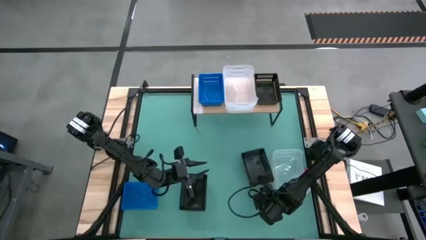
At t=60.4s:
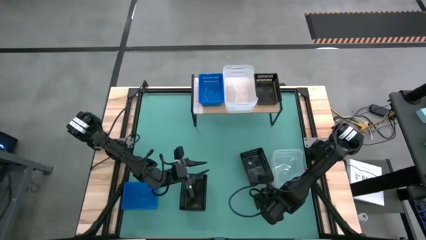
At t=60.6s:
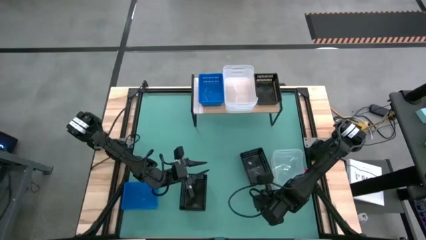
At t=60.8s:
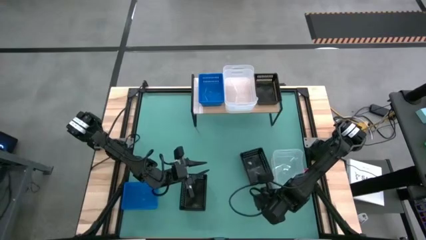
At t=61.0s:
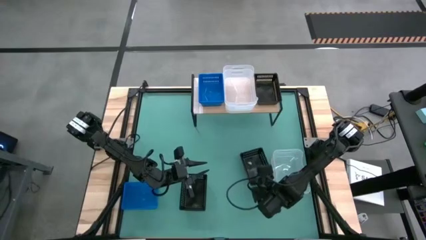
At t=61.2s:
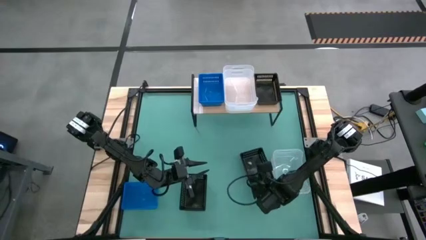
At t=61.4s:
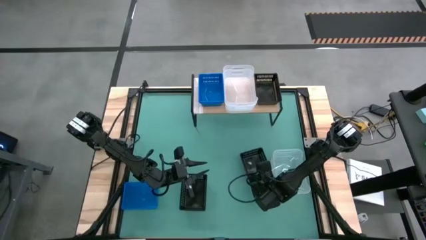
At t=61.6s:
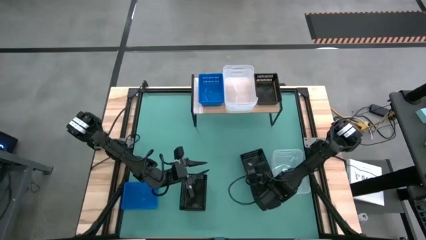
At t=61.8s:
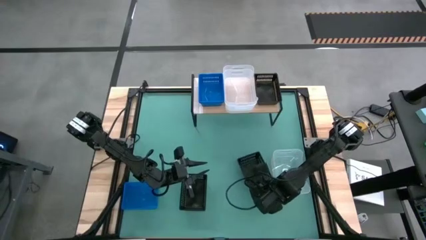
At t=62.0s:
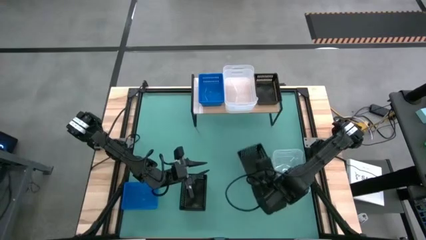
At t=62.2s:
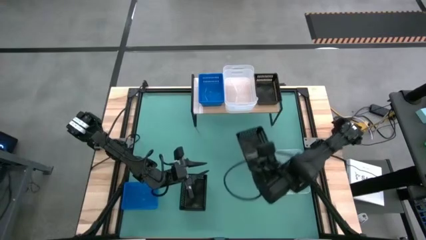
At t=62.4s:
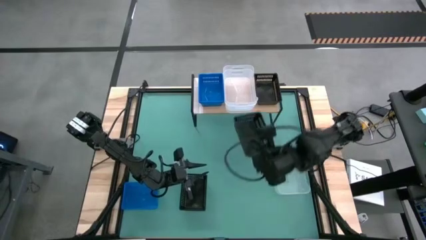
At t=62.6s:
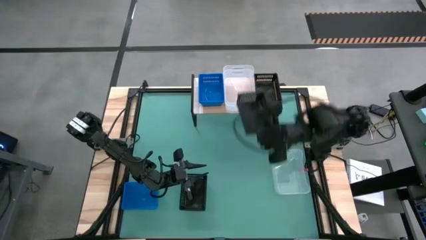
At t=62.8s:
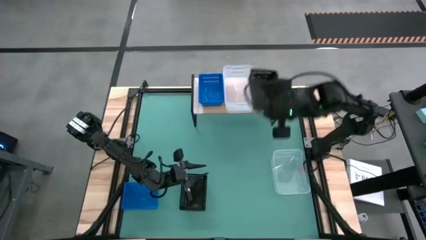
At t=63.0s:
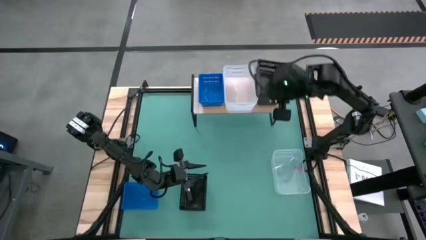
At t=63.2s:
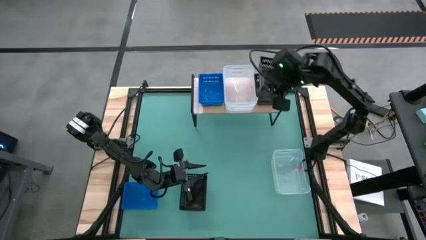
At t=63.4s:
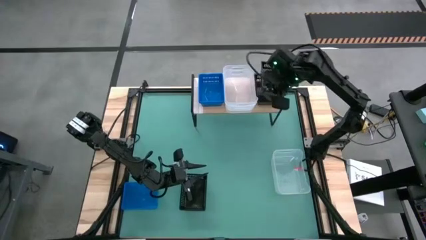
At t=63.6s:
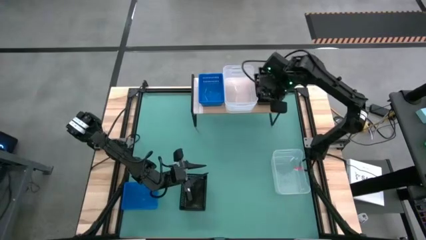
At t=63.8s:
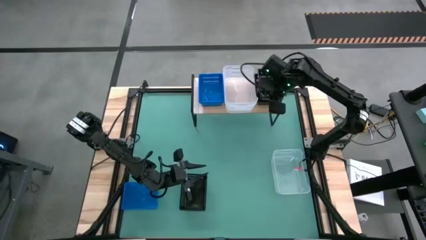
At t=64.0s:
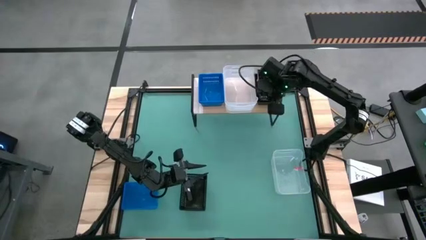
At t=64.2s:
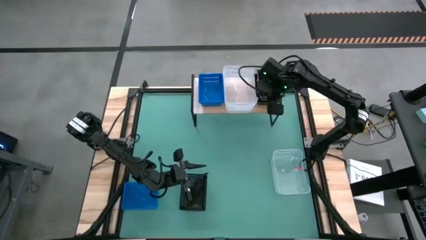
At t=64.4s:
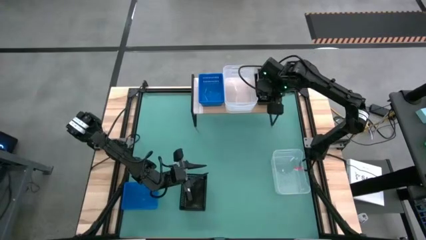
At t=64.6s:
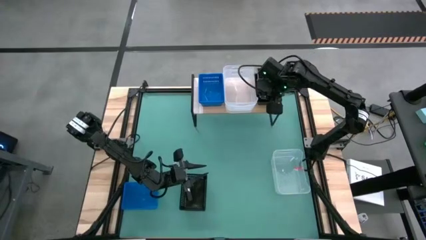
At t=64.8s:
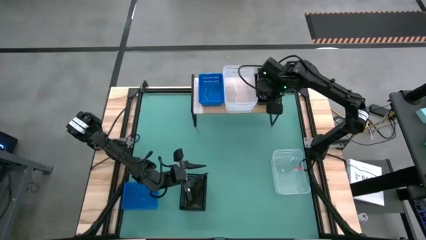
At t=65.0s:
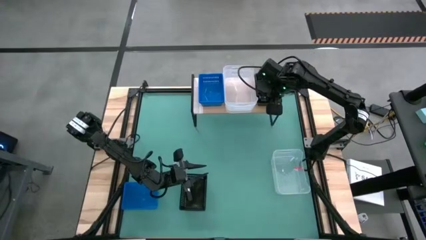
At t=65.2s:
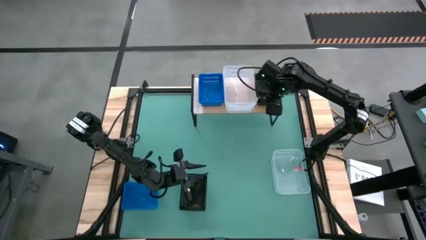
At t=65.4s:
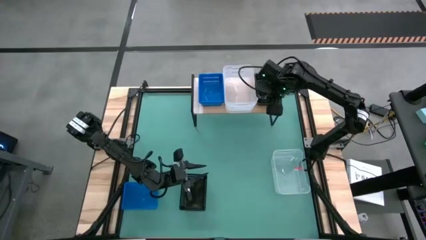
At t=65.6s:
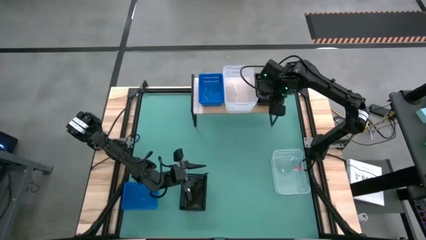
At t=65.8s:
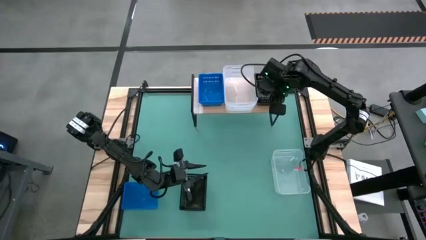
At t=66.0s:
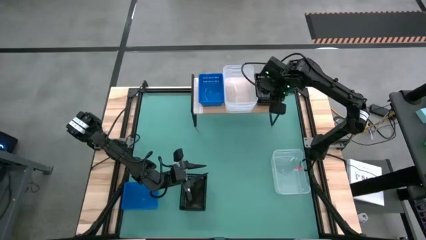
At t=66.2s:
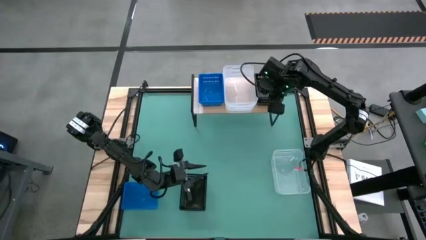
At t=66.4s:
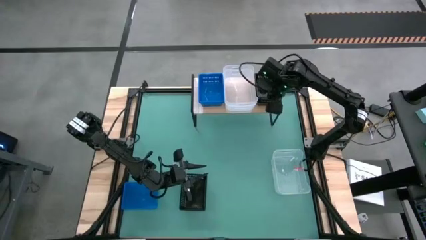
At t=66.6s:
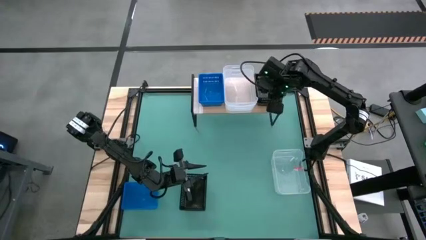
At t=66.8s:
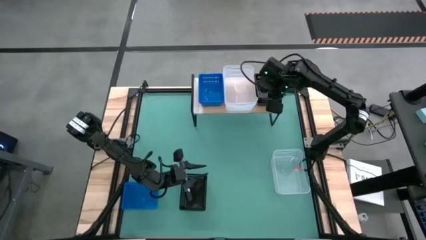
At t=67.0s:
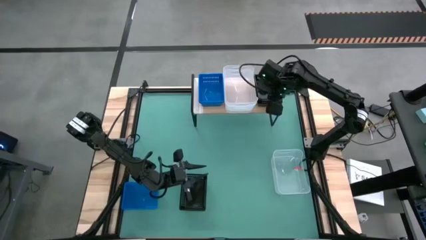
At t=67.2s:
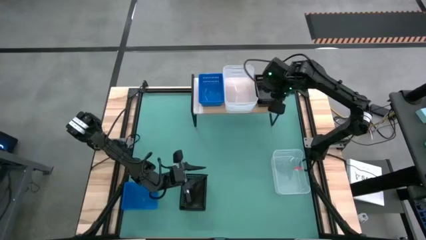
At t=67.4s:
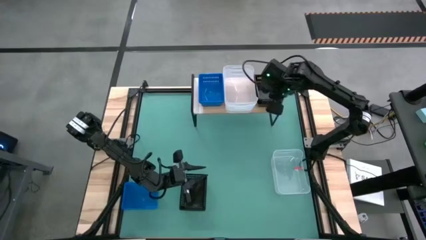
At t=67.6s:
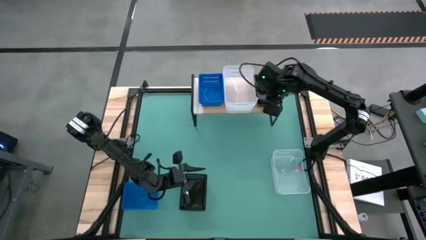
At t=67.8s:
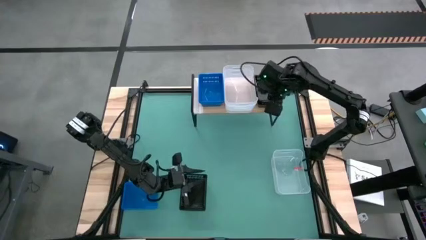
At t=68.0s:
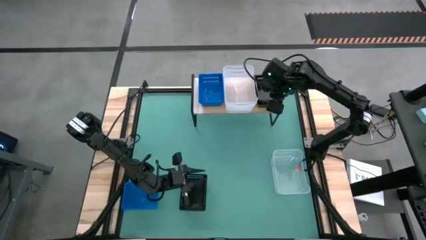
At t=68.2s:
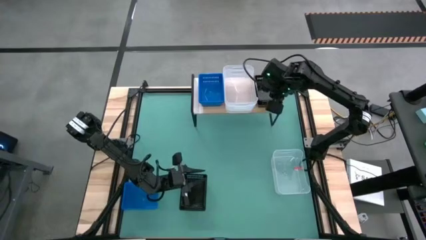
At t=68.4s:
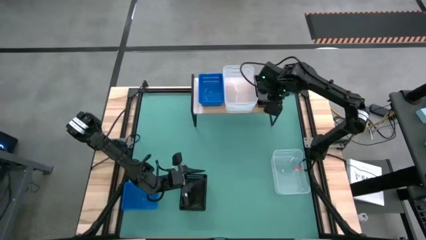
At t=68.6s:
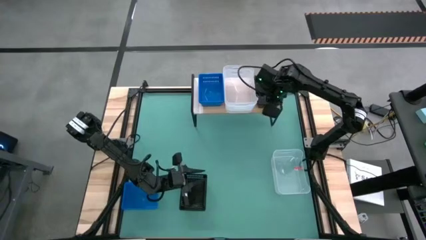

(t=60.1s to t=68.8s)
Task: Stack baskets on shelf by color
Stack the right black bin on the black bin on the shelf

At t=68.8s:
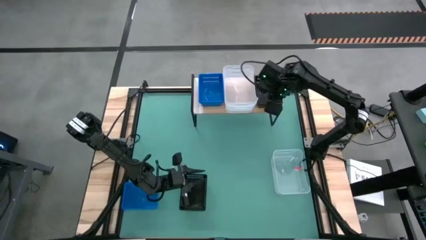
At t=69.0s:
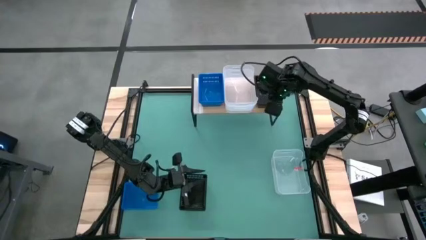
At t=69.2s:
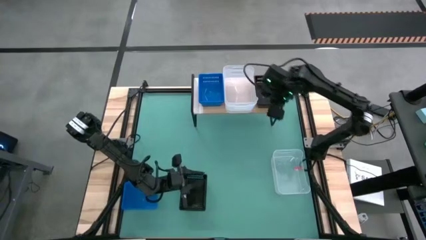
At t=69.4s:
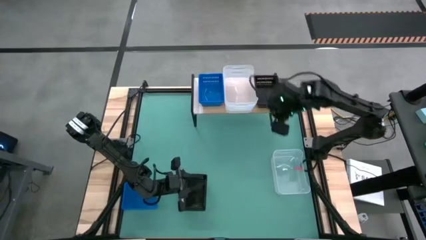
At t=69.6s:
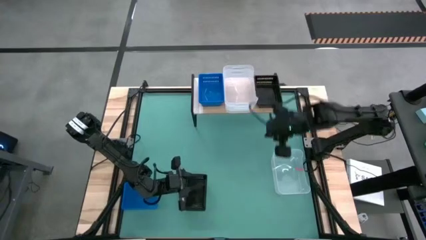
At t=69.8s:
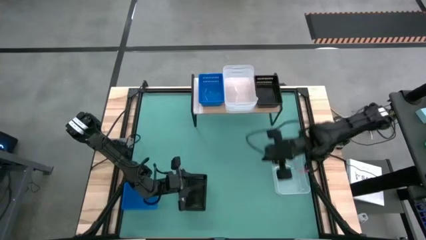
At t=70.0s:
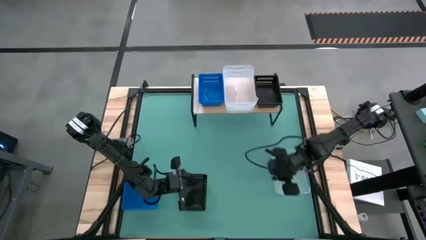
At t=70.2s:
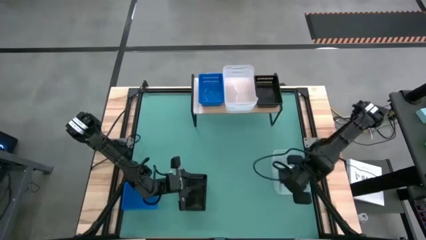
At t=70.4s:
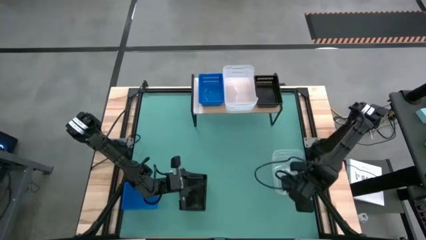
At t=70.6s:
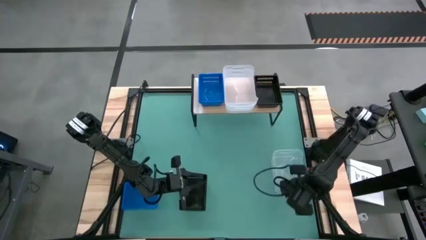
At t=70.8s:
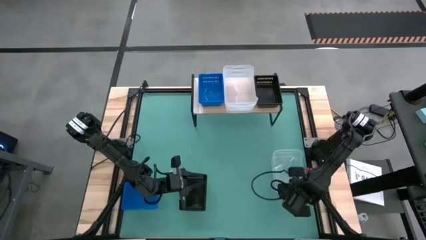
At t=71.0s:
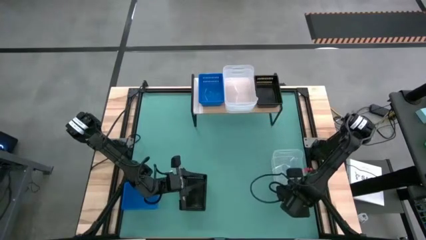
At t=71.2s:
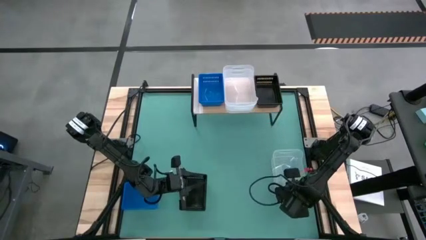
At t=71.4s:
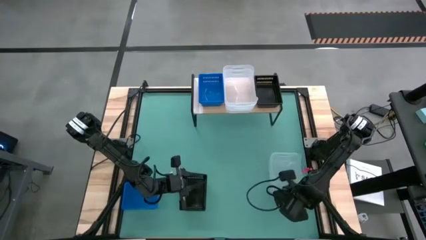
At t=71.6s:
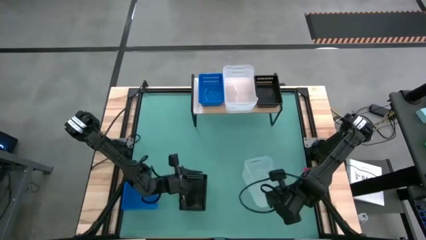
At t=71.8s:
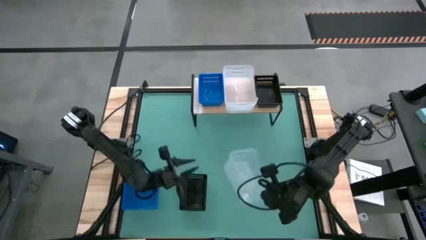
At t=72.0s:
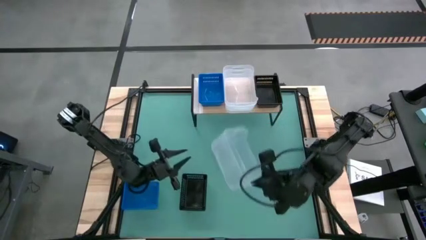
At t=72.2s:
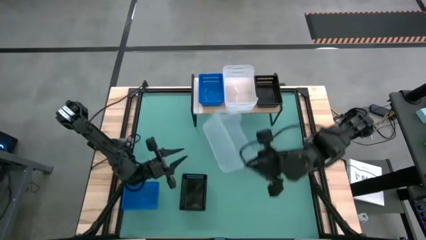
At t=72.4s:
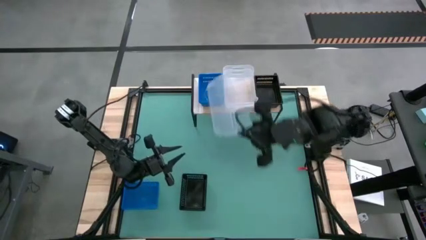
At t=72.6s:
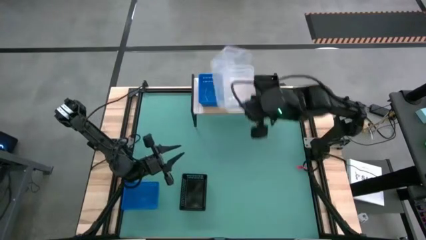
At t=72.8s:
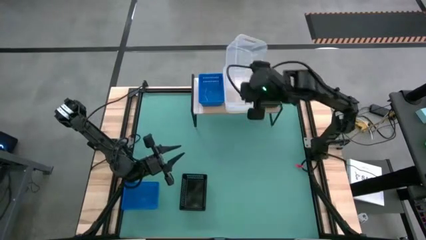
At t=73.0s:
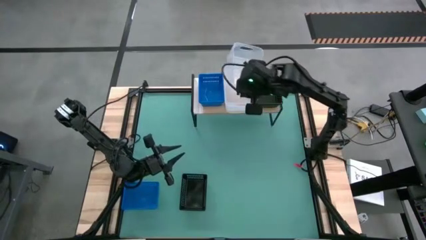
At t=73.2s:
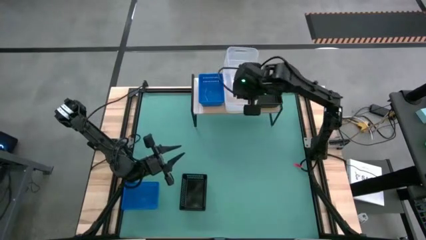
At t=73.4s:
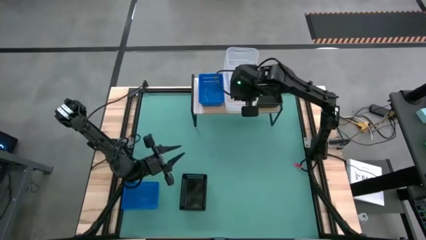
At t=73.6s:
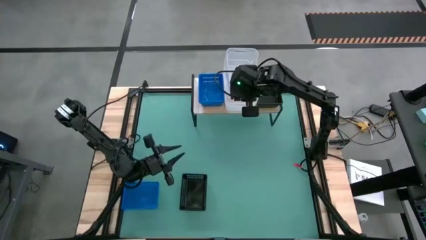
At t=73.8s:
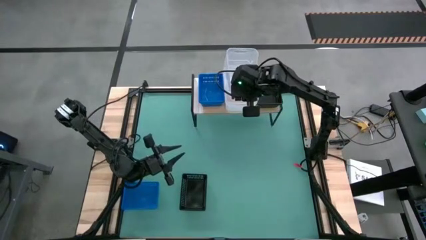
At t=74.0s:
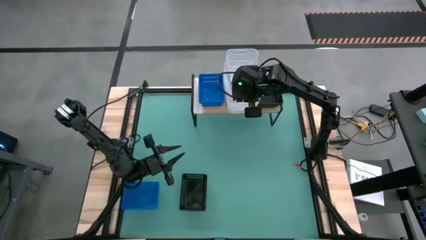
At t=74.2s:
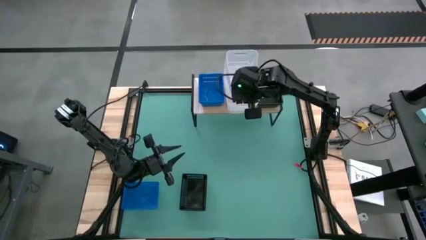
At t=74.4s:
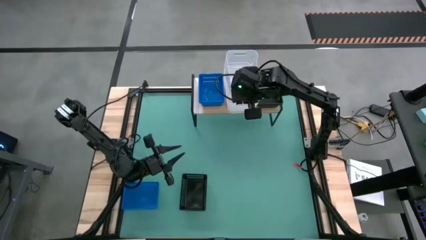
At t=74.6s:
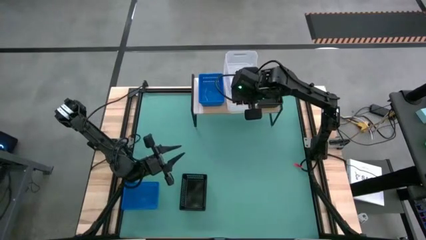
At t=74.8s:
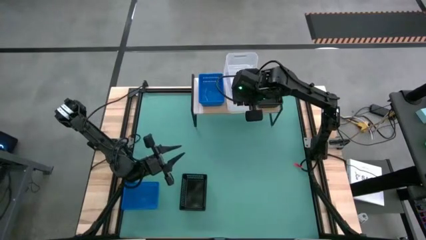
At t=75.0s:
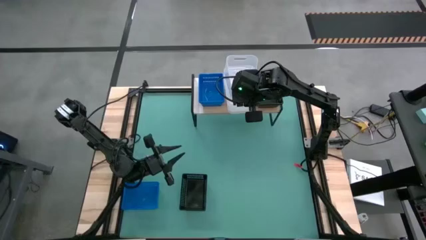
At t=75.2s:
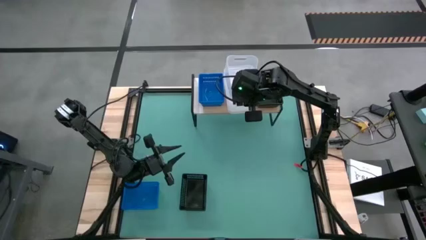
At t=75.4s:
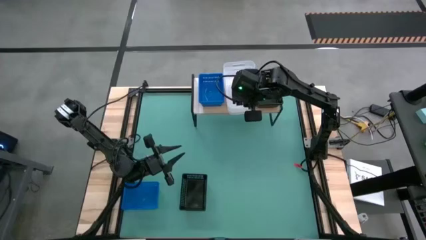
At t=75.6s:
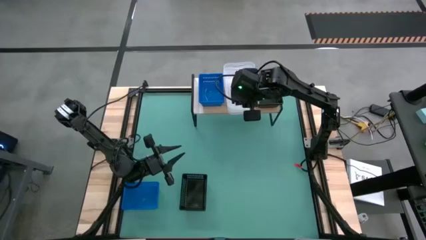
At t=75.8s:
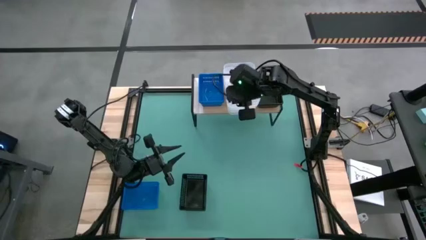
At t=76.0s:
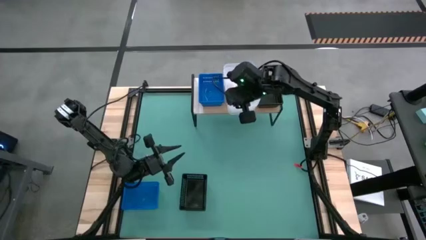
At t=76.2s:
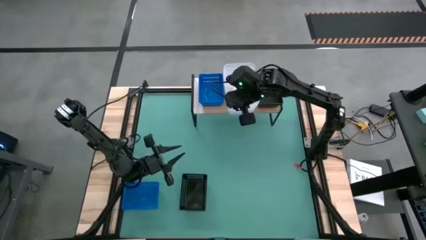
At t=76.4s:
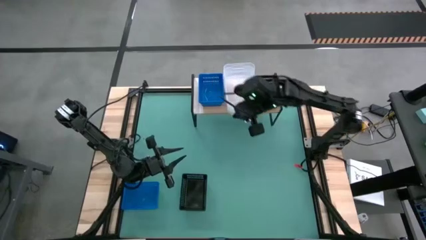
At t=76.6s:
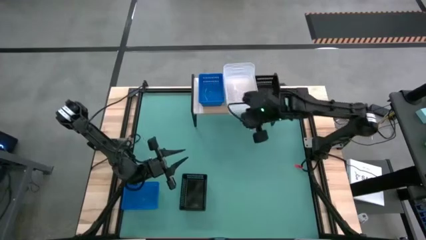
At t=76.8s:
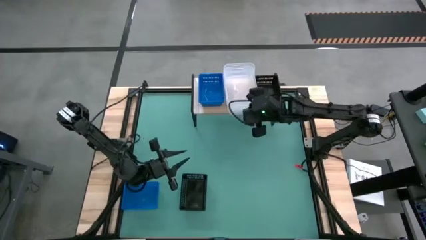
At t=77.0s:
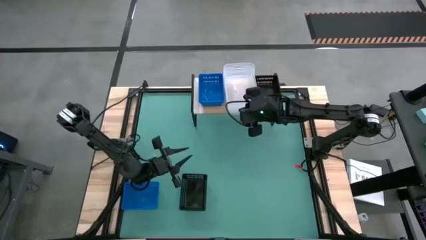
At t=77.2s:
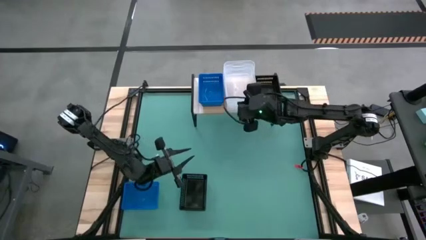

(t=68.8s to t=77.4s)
Stack the transparent bin on the transparent bin on the shelf
